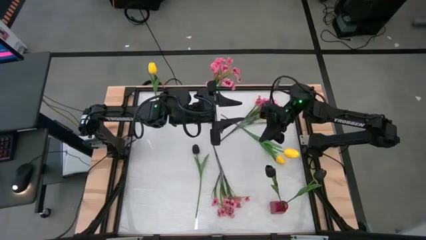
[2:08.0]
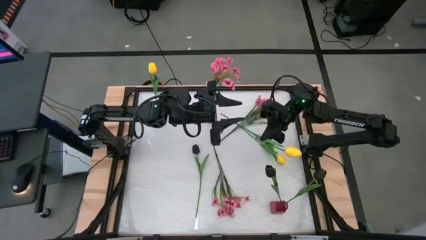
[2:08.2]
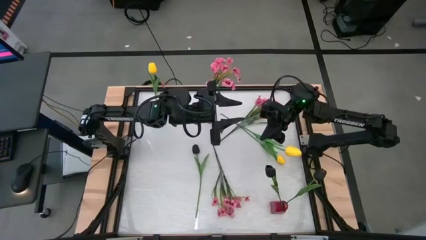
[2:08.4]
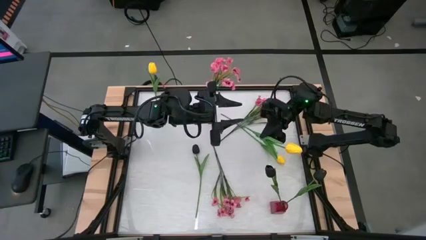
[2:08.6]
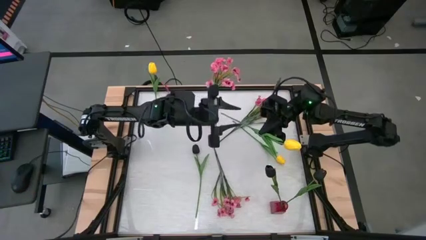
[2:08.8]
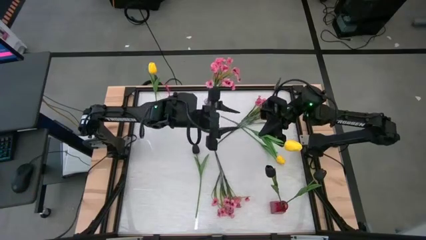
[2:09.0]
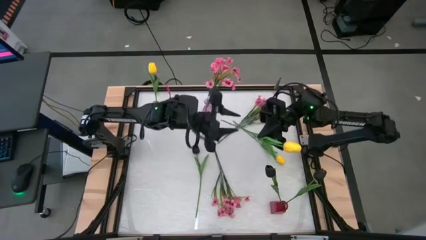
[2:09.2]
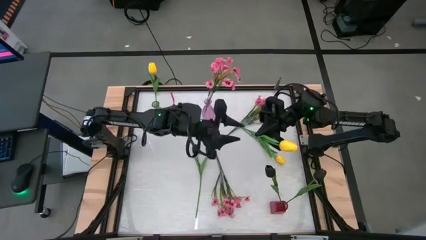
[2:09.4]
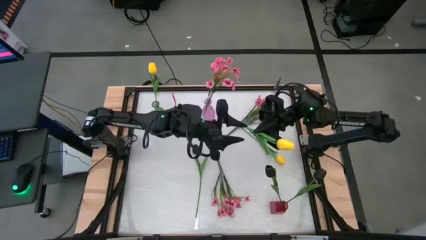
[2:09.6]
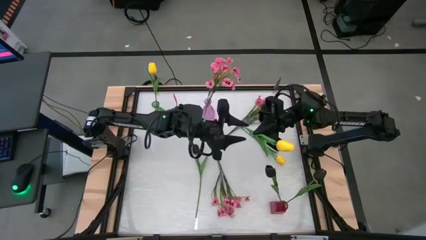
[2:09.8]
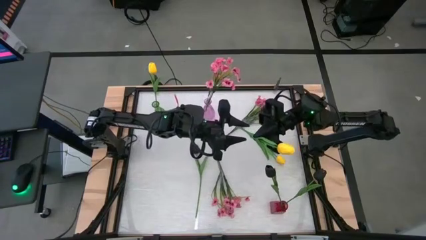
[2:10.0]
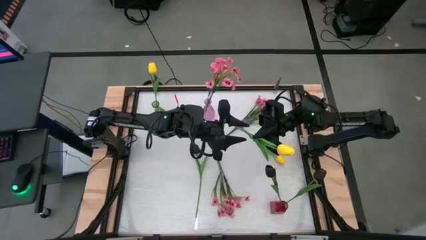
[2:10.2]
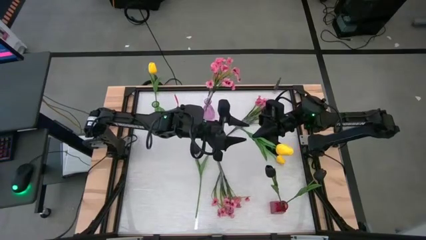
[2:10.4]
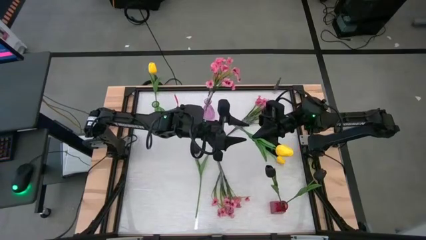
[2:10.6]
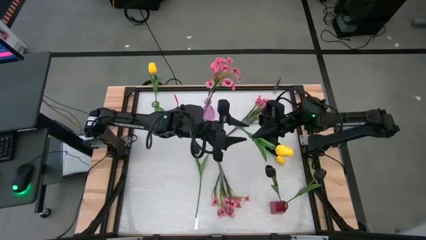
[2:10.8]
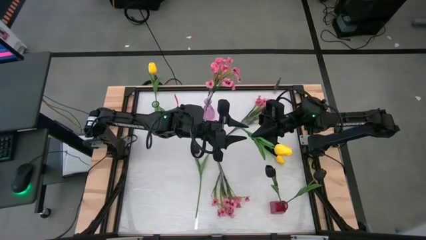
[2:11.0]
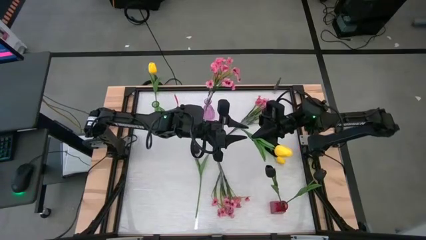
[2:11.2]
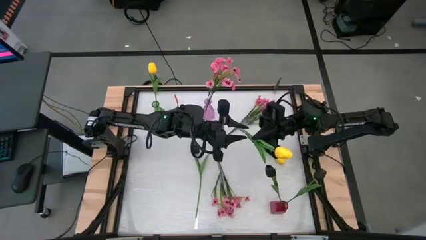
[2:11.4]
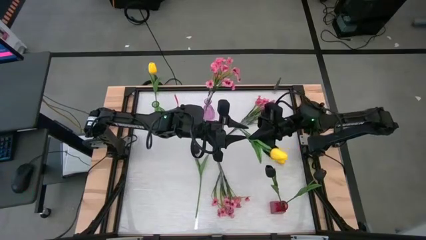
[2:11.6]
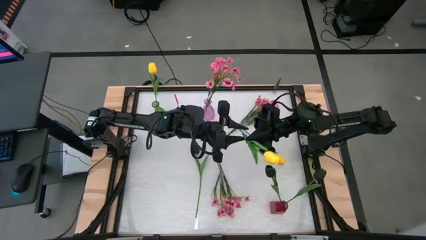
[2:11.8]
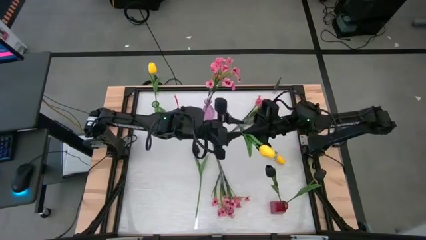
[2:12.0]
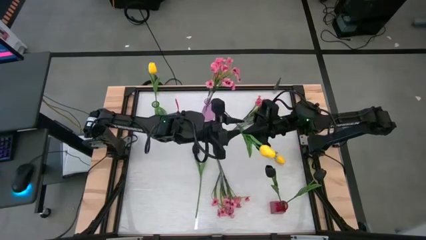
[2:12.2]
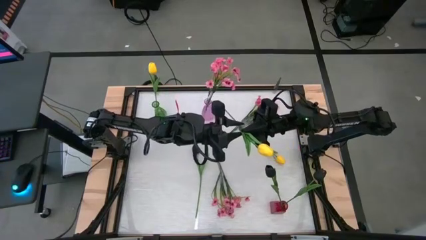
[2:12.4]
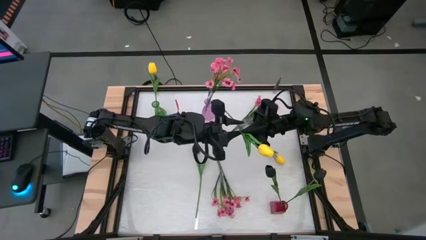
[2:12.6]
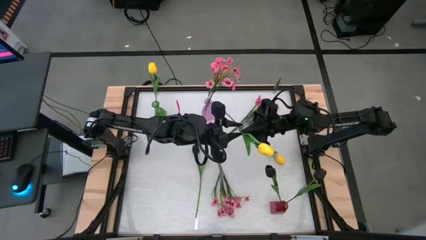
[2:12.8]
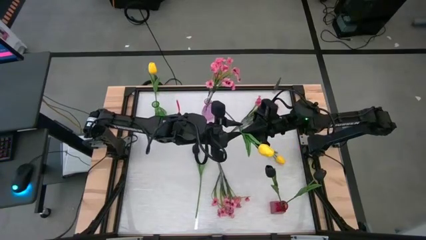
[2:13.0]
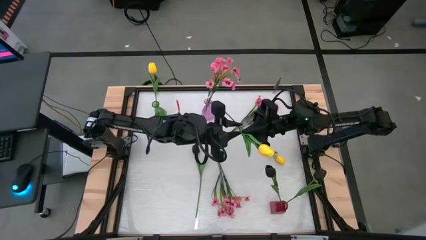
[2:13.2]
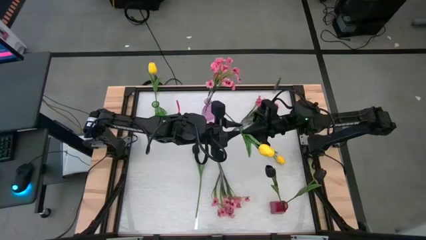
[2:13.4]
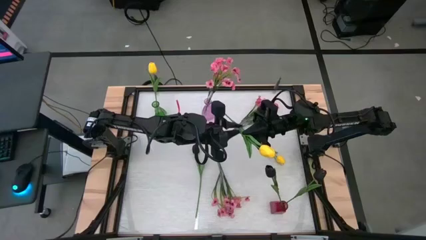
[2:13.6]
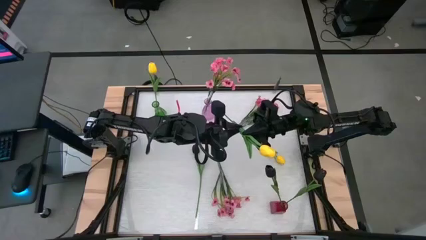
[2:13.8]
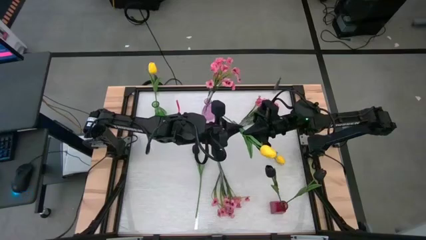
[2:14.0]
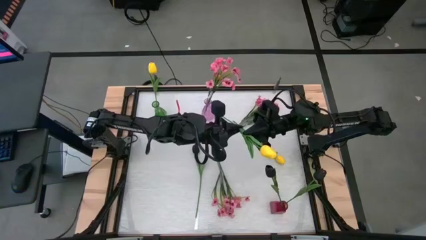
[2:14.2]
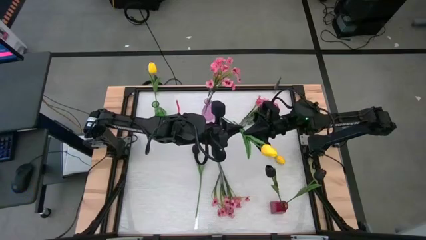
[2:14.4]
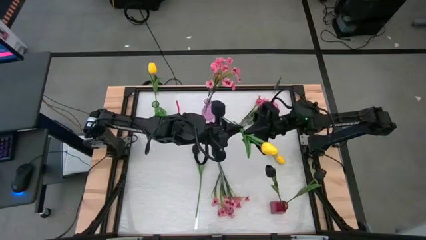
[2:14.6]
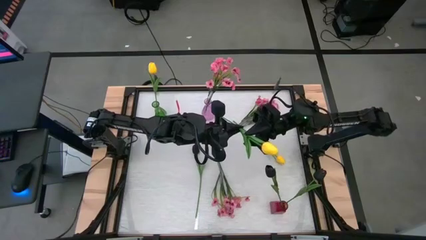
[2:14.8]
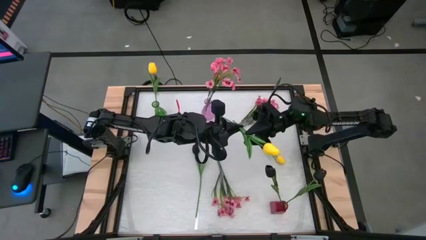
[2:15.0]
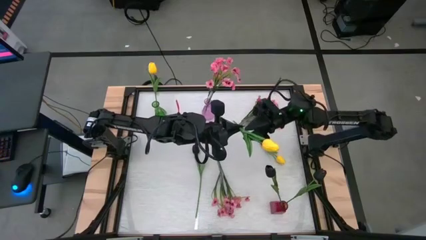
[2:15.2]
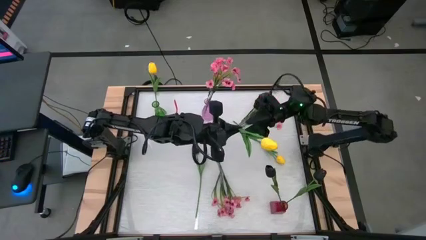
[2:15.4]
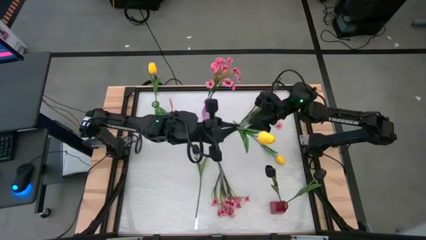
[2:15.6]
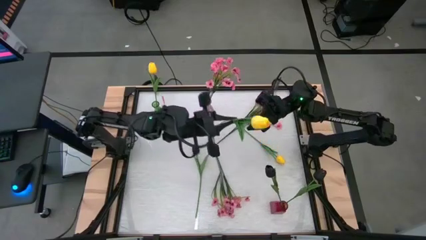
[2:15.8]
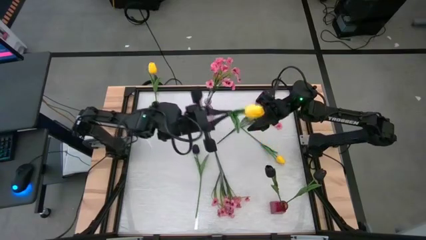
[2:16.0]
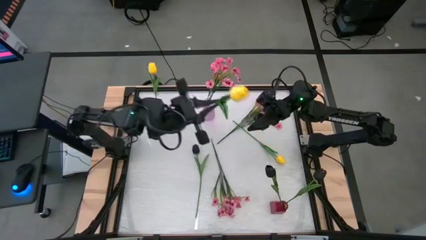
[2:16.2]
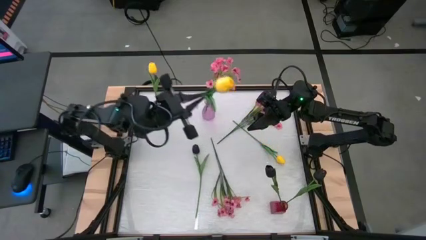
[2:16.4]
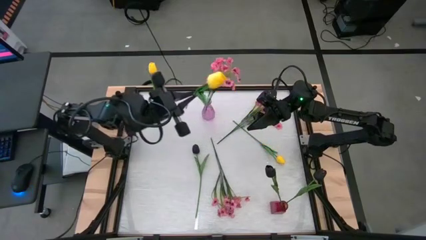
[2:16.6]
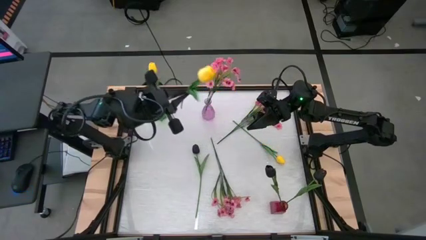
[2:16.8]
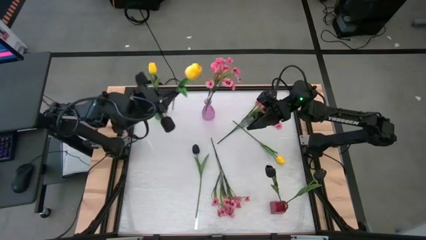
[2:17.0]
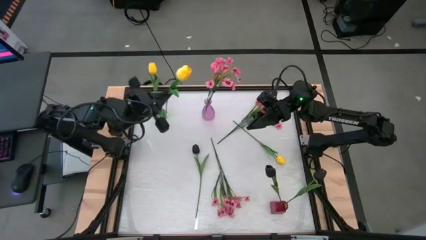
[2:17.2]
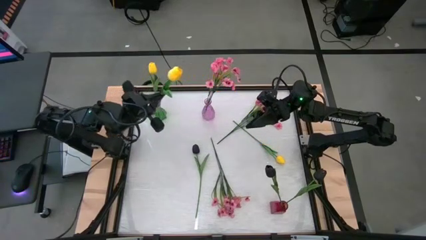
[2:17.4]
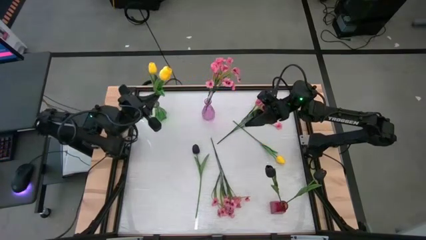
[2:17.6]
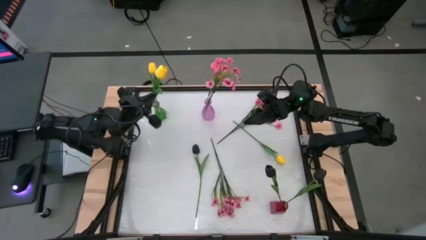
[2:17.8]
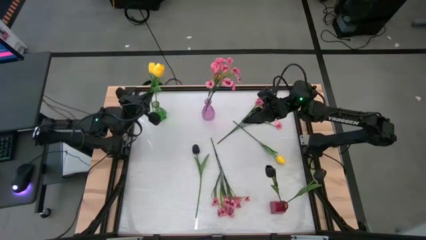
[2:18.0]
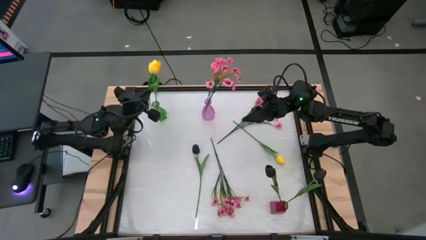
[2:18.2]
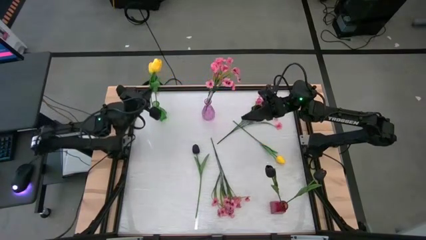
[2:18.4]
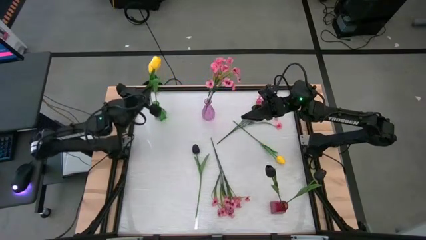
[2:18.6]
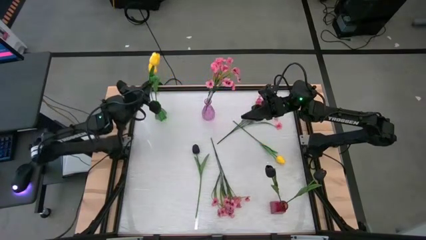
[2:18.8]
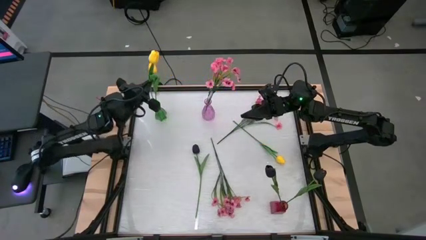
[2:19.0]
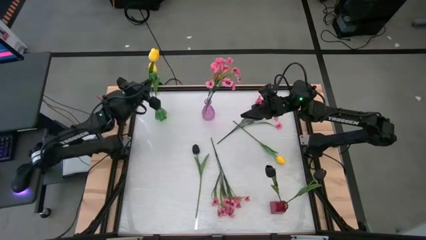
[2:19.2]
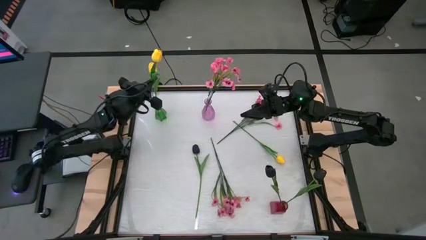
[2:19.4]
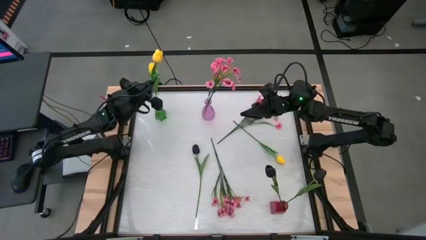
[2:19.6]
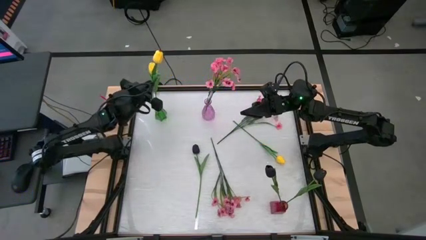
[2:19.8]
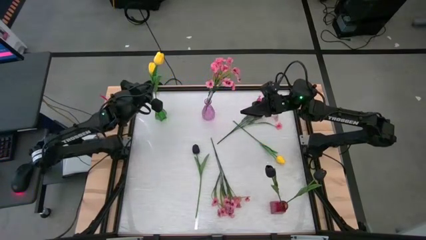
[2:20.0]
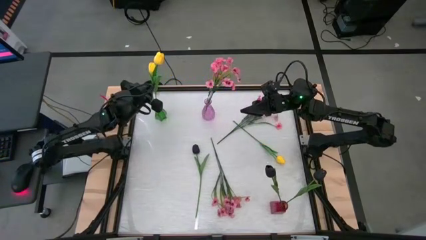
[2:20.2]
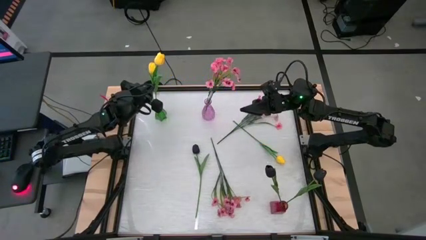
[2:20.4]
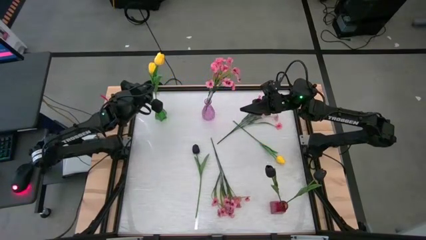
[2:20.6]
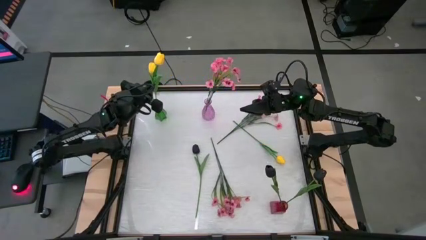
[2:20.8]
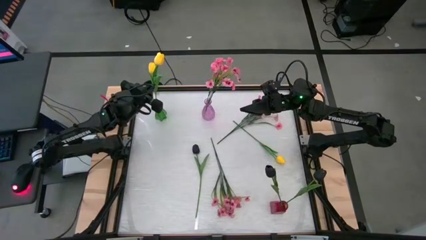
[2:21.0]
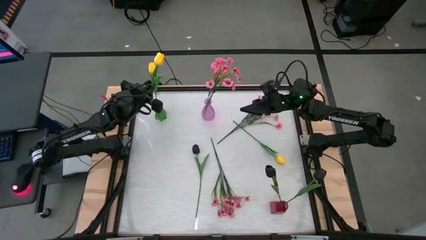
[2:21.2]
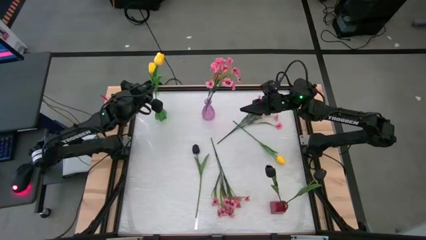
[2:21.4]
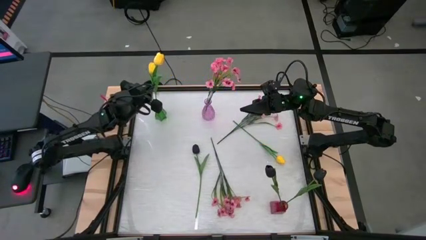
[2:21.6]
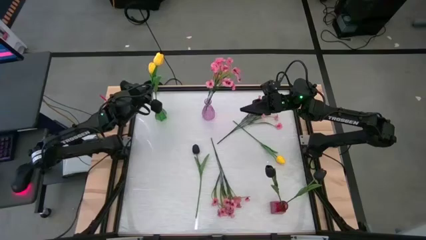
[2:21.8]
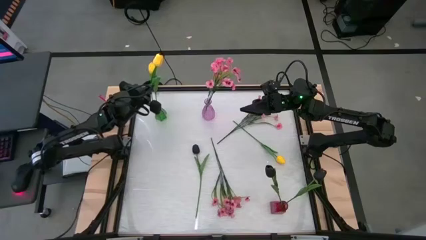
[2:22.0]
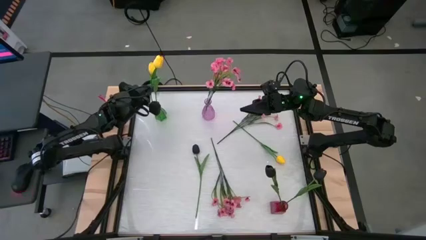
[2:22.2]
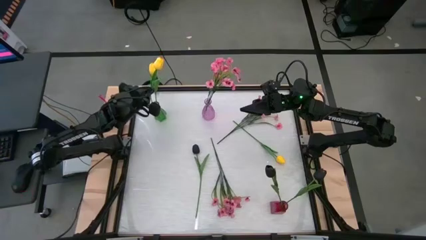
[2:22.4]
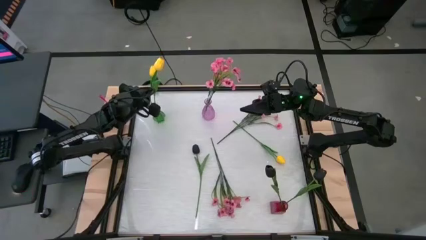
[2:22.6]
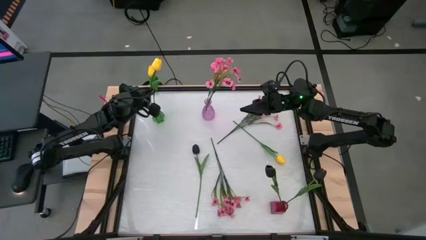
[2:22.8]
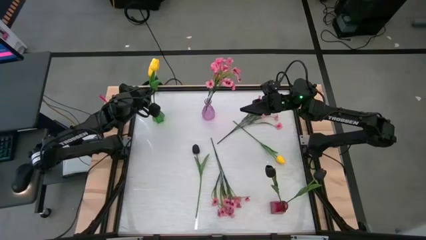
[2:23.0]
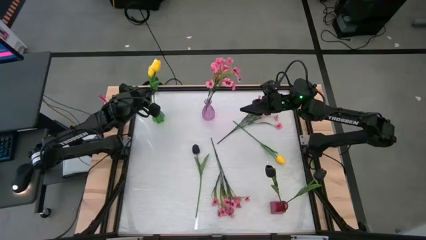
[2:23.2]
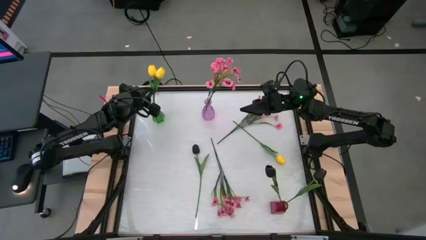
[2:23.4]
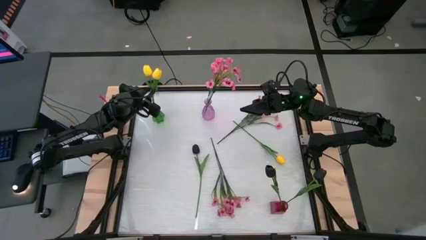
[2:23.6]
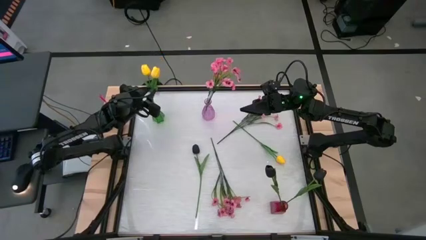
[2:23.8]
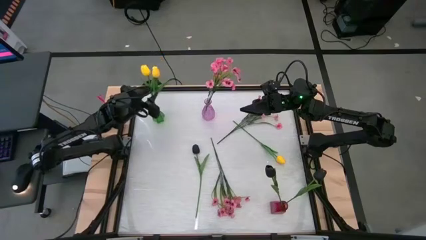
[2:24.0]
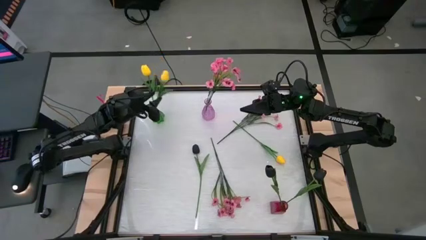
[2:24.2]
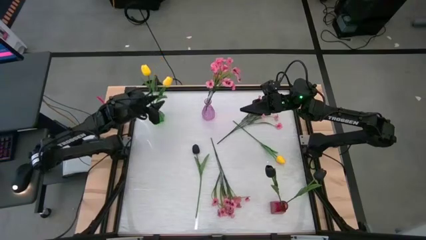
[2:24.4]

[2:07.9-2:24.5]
Task: Sort flowers into vase by color
Put the top yellow flower into the green vase

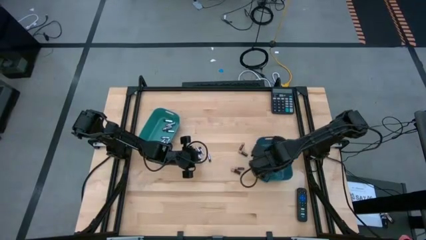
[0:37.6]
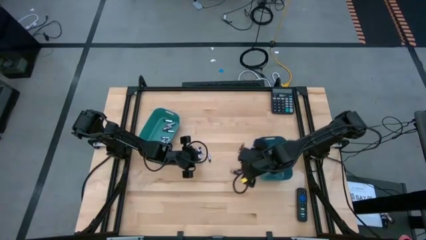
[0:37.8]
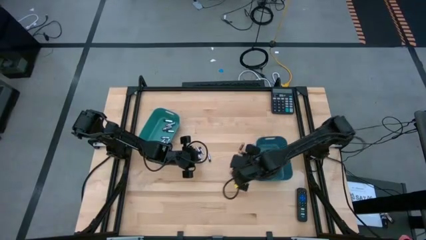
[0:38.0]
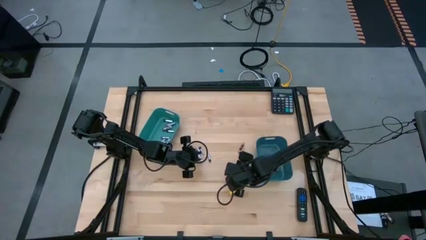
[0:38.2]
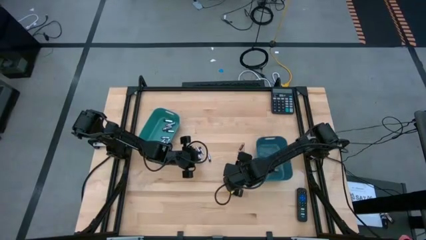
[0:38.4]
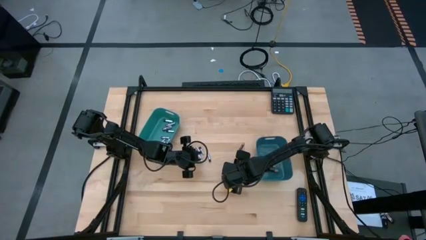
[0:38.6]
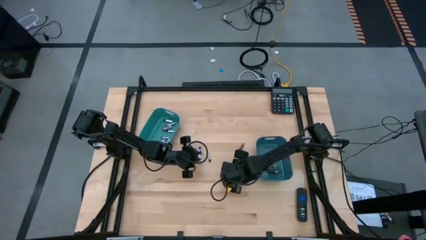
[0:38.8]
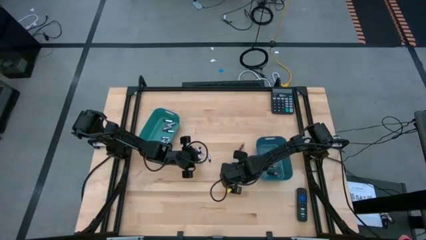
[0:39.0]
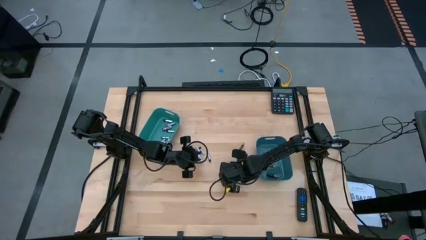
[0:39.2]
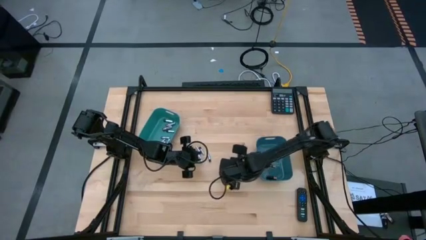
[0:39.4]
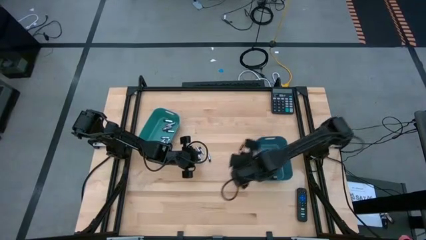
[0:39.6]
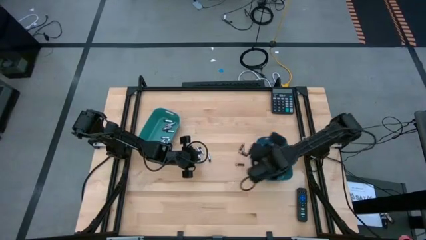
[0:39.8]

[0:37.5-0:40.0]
Task: Sort batteries
Put the black battery into the blue bin
